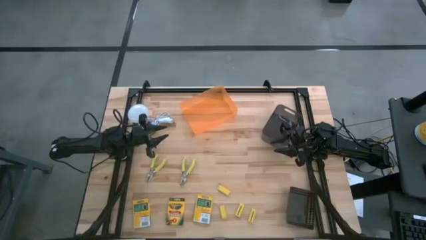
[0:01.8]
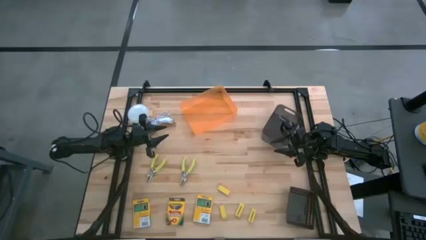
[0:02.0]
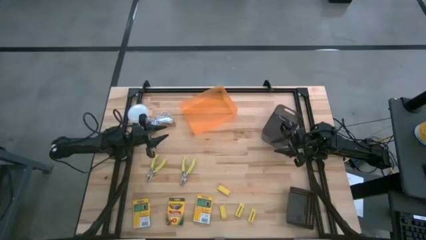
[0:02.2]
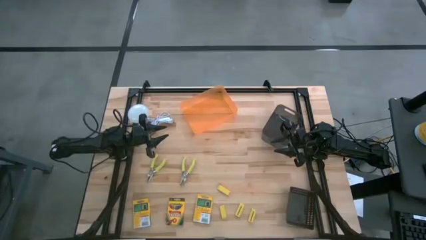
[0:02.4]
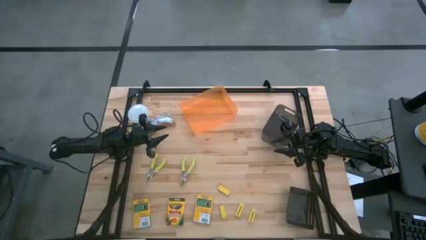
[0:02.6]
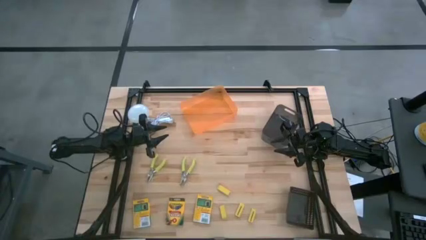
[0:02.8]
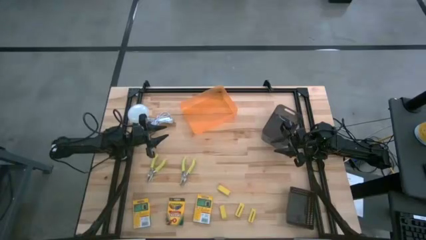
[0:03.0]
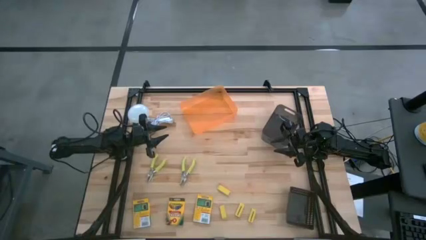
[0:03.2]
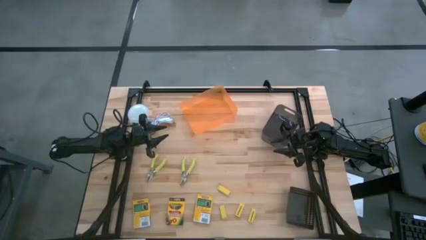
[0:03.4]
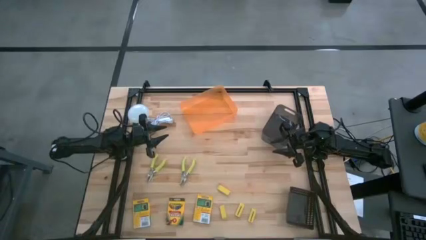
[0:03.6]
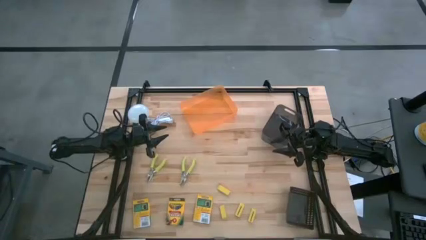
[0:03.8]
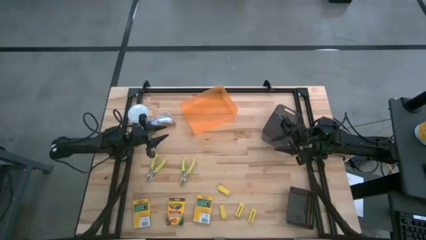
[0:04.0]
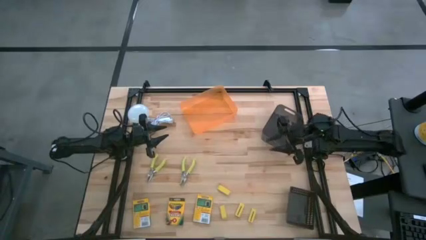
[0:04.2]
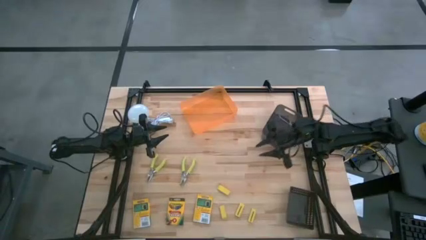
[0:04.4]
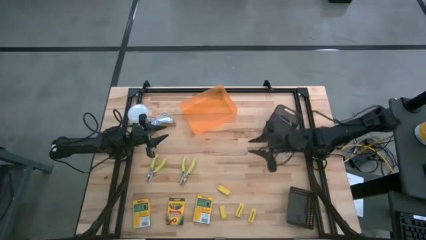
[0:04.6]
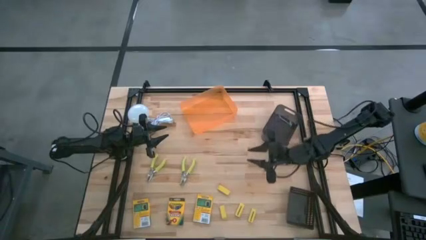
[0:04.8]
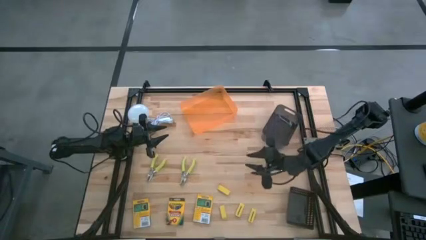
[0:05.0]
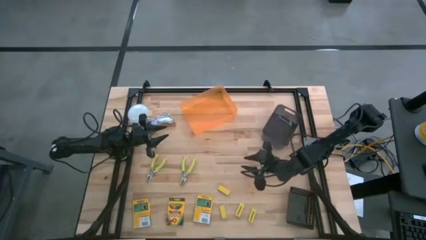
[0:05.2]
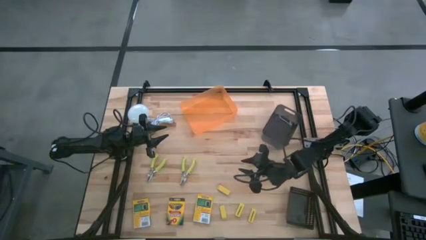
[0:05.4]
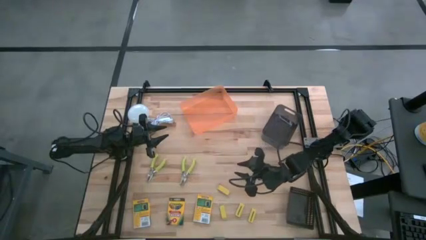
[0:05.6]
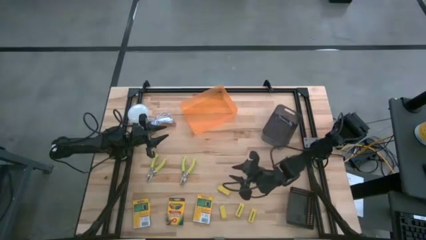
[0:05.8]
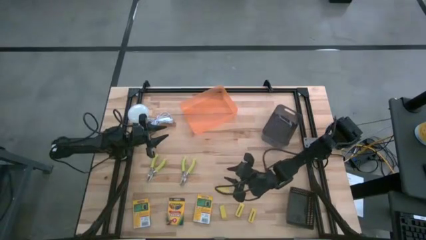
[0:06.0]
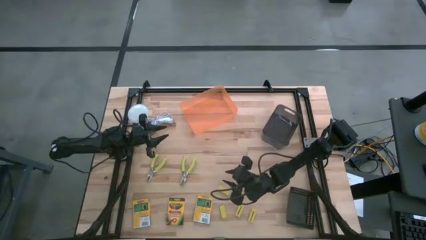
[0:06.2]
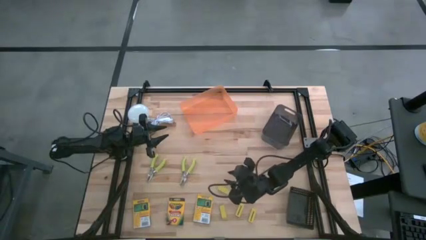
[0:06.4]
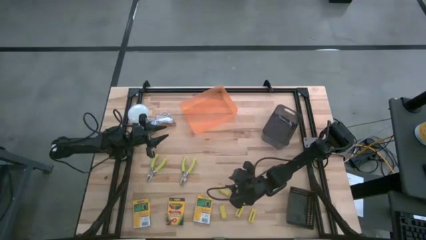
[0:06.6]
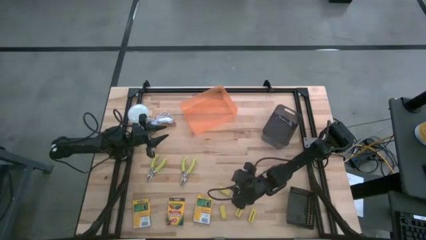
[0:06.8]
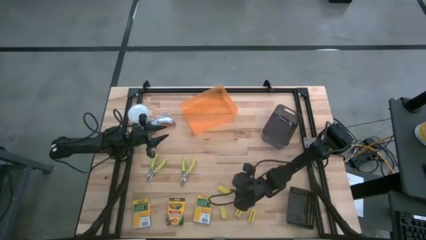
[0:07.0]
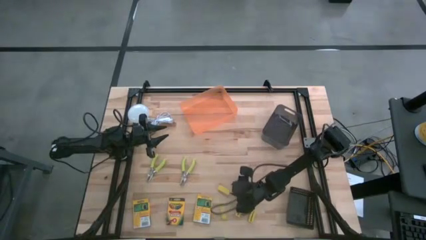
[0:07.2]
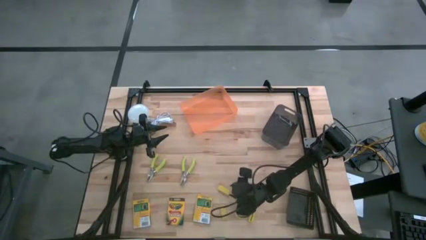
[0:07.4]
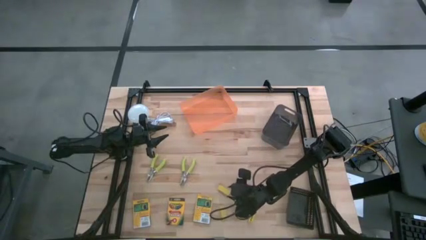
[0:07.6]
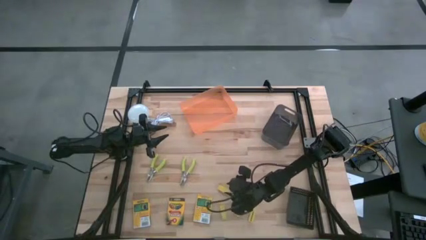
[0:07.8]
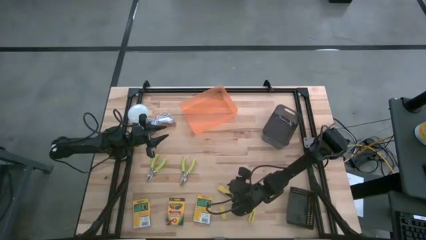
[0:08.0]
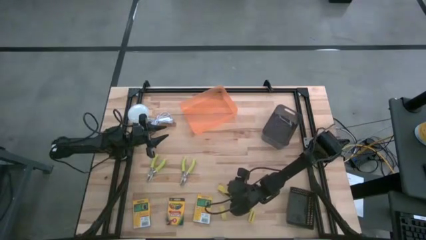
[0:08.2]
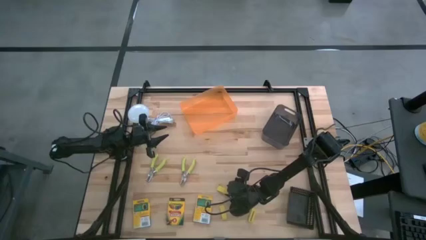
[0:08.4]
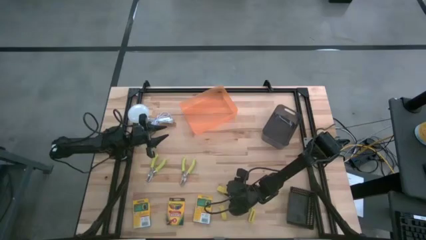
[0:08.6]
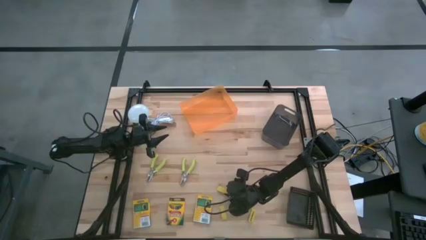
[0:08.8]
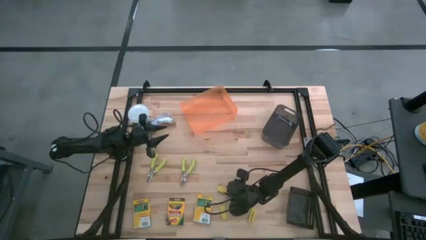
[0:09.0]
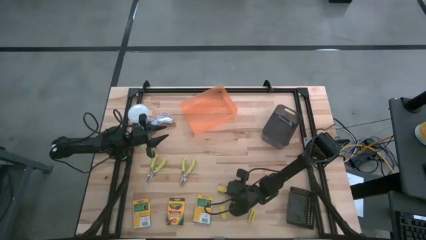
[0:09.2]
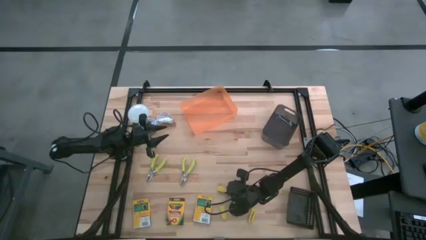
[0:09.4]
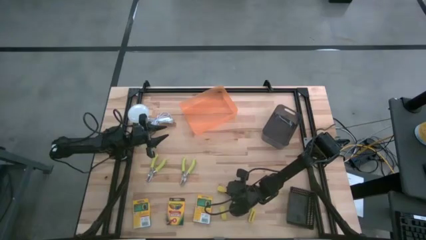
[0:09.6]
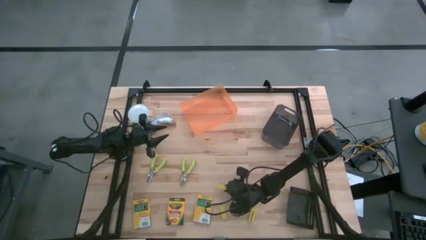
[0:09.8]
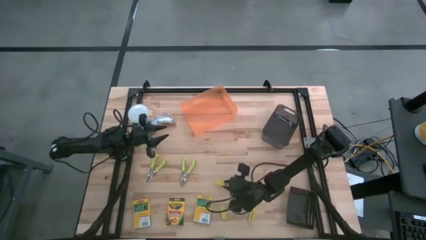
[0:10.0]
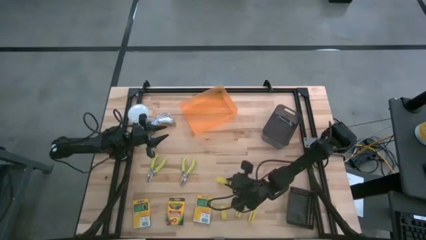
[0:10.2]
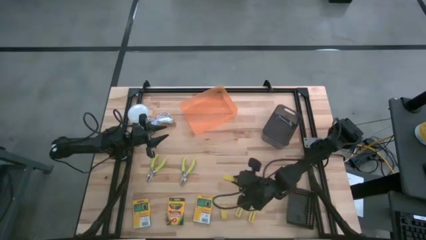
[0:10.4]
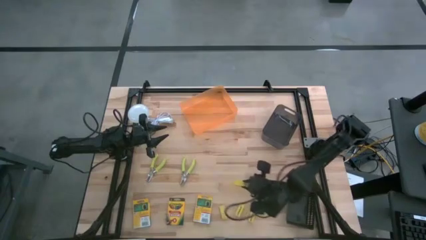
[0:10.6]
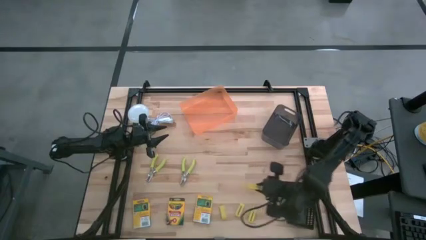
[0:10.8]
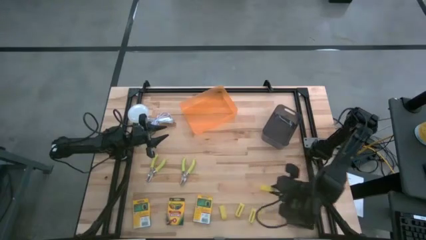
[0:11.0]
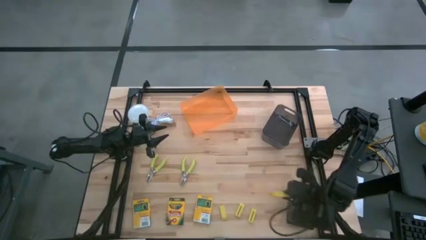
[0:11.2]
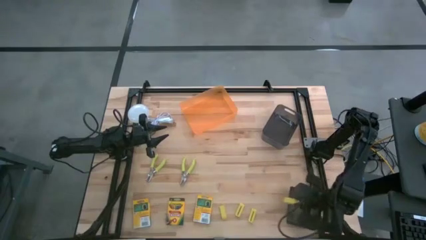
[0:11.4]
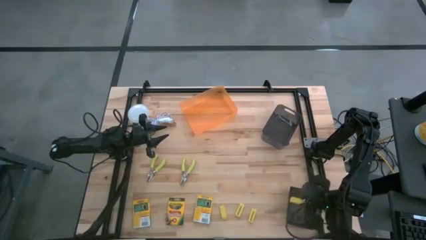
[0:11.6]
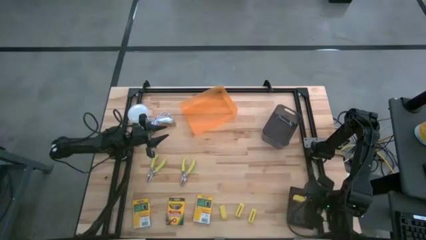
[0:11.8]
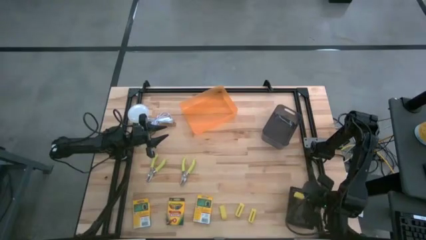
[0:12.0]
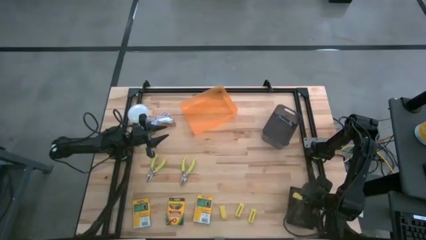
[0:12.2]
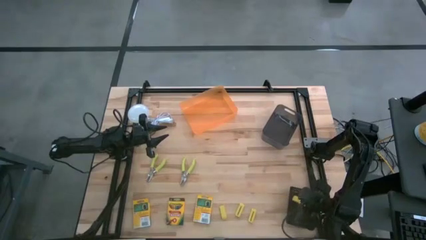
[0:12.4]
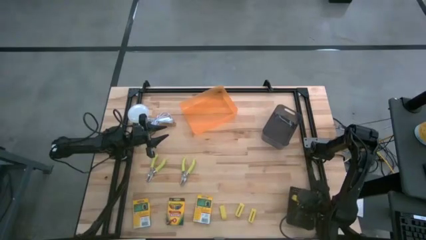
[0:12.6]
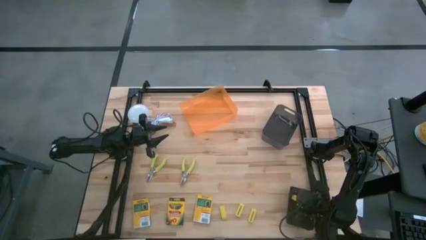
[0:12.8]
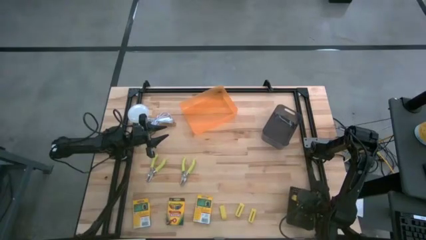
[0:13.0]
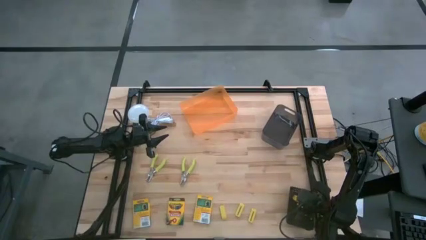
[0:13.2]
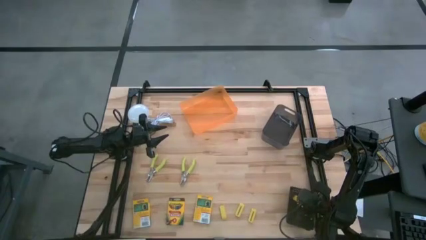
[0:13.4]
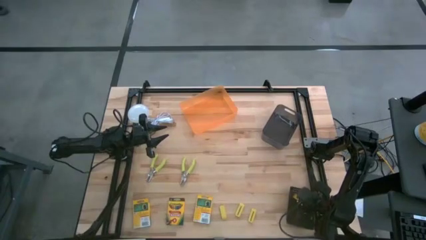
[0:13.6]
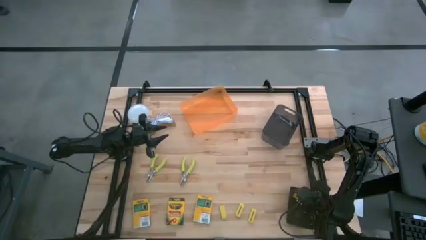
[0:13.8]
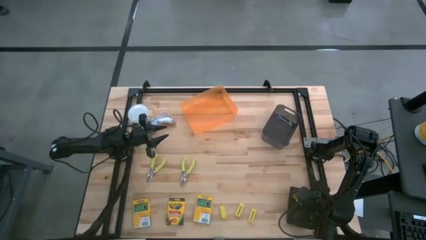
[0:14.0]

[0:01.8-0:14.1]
Task: Pick & Place School Supplies
Put the yellow eraser into the black basket
